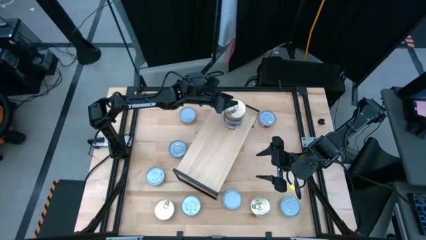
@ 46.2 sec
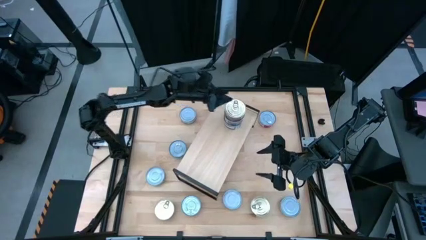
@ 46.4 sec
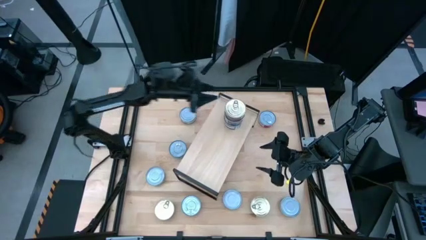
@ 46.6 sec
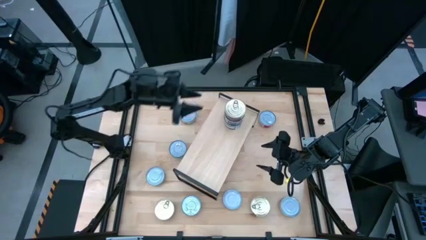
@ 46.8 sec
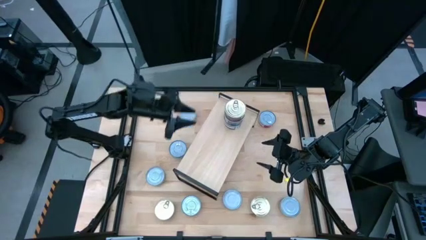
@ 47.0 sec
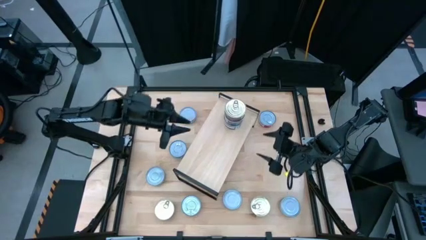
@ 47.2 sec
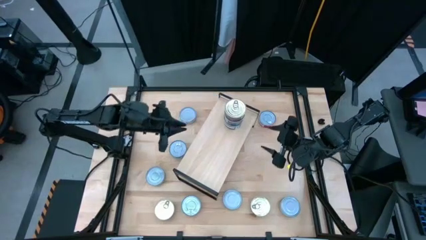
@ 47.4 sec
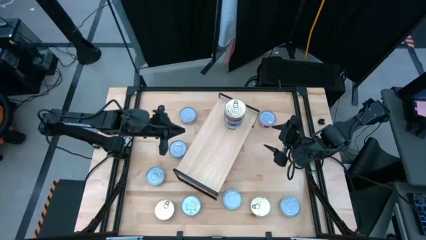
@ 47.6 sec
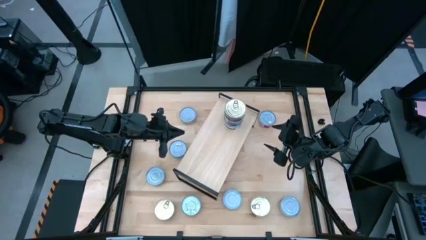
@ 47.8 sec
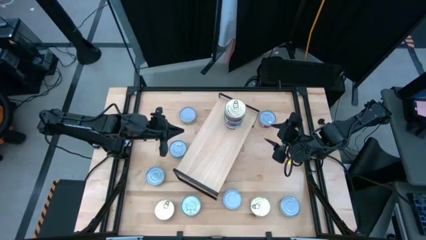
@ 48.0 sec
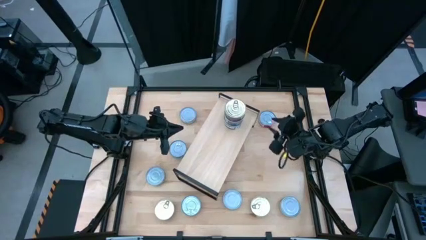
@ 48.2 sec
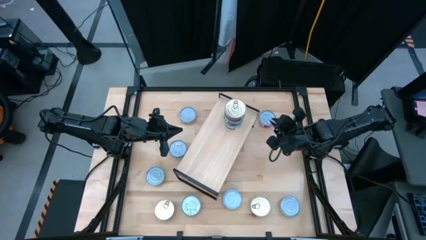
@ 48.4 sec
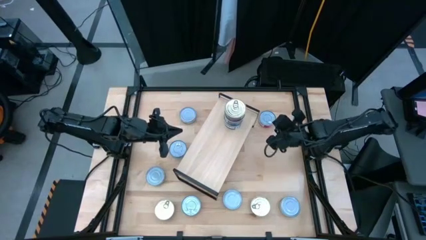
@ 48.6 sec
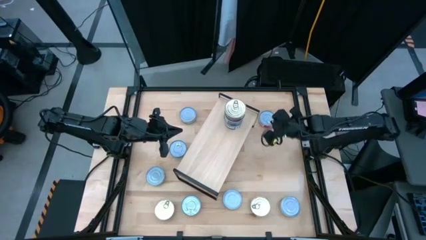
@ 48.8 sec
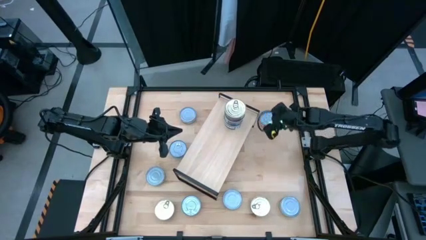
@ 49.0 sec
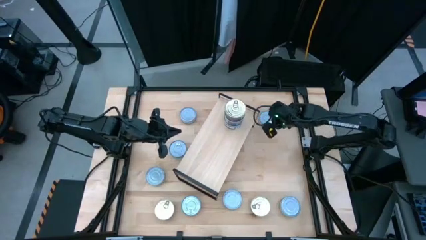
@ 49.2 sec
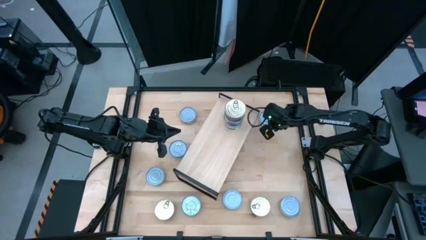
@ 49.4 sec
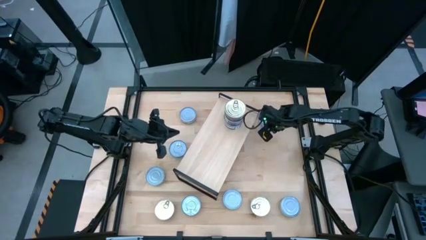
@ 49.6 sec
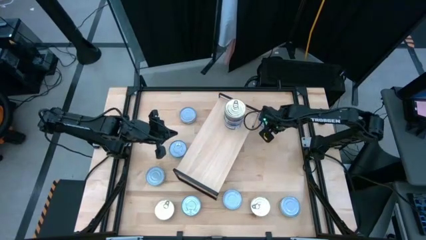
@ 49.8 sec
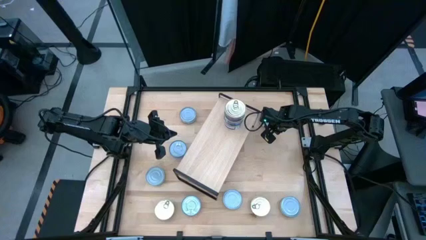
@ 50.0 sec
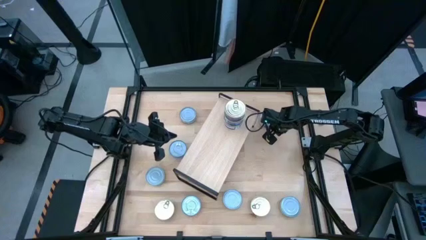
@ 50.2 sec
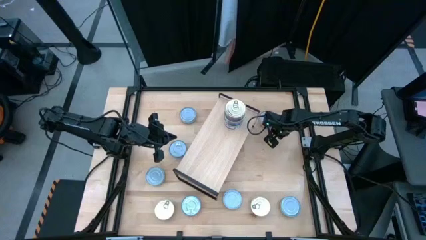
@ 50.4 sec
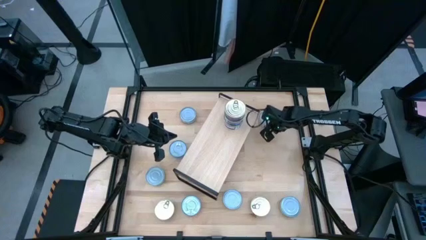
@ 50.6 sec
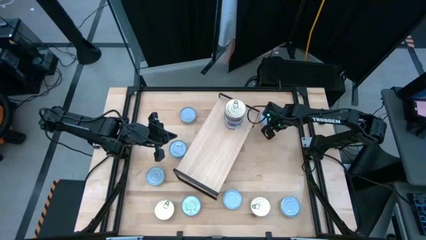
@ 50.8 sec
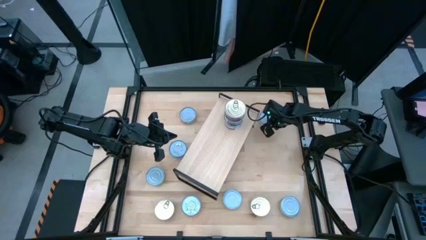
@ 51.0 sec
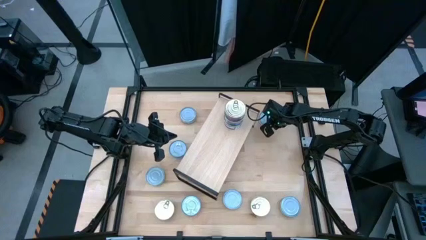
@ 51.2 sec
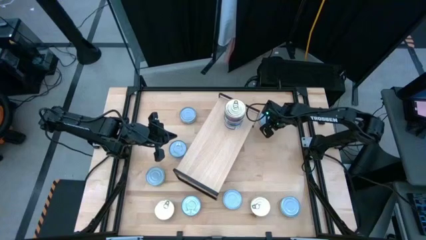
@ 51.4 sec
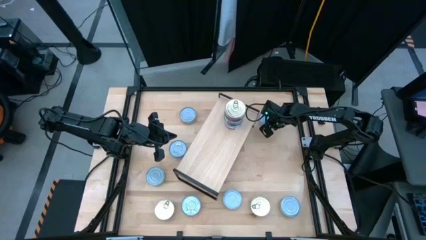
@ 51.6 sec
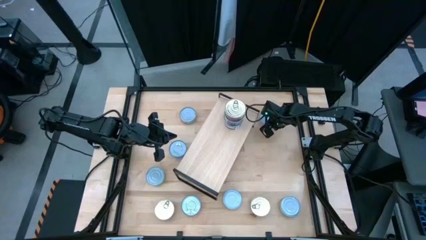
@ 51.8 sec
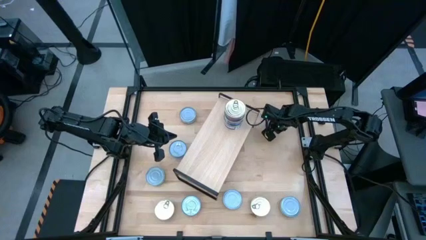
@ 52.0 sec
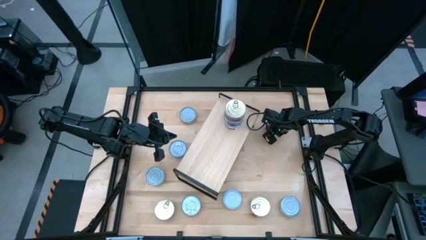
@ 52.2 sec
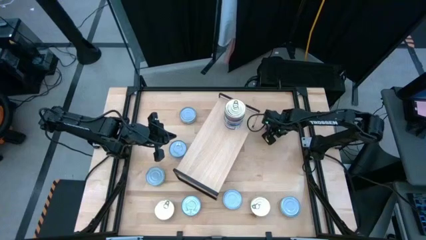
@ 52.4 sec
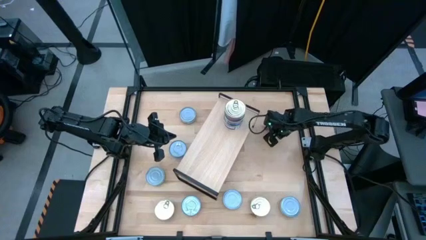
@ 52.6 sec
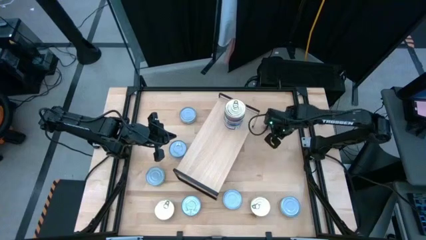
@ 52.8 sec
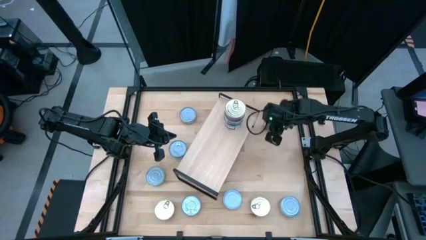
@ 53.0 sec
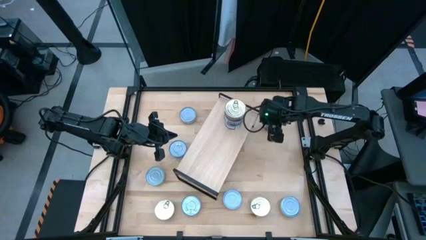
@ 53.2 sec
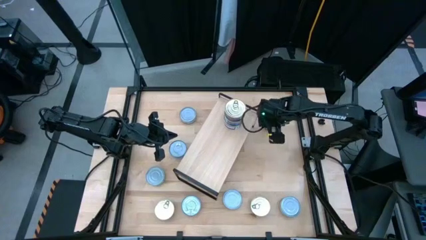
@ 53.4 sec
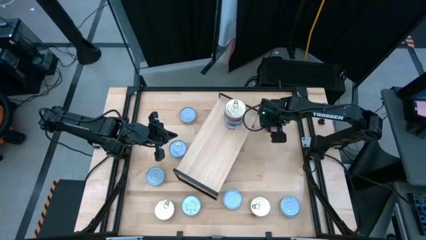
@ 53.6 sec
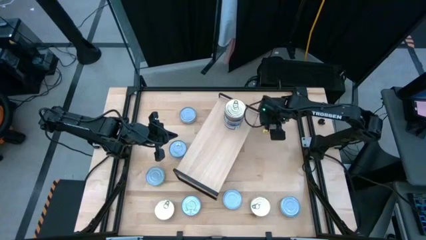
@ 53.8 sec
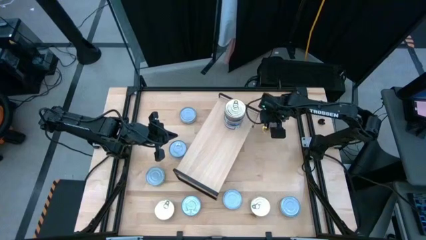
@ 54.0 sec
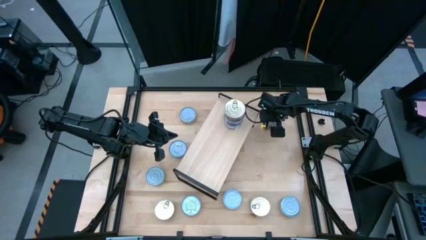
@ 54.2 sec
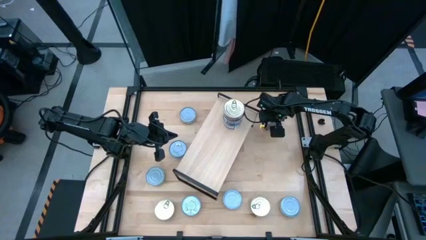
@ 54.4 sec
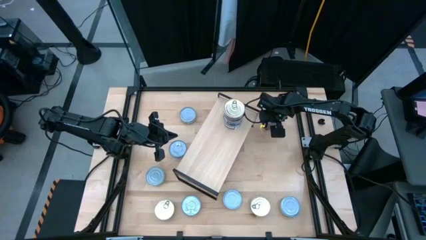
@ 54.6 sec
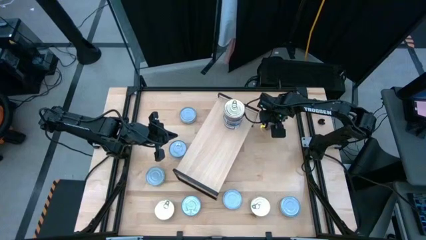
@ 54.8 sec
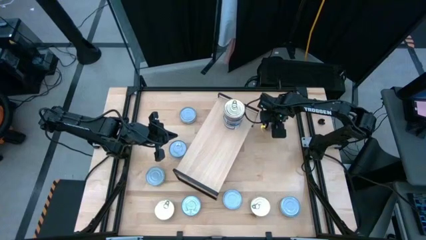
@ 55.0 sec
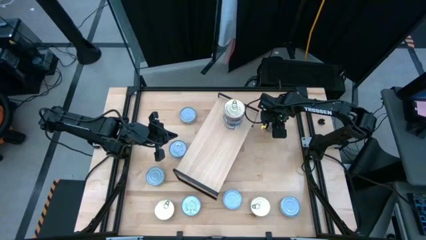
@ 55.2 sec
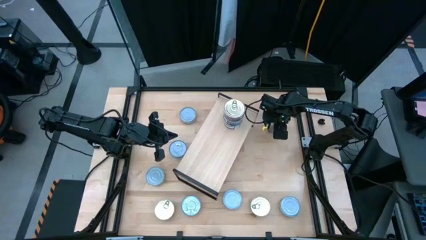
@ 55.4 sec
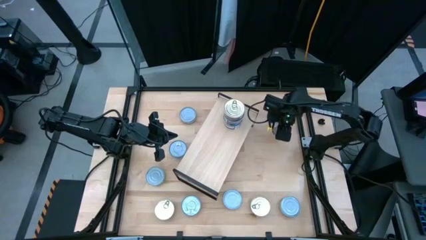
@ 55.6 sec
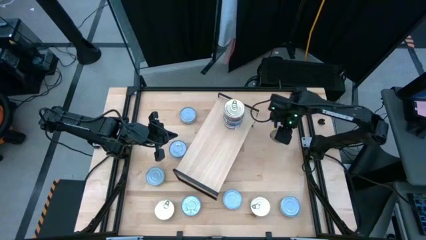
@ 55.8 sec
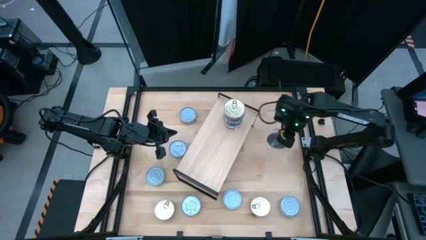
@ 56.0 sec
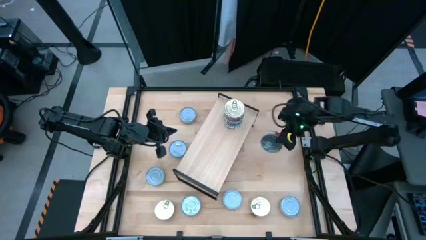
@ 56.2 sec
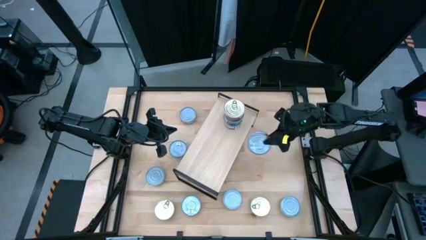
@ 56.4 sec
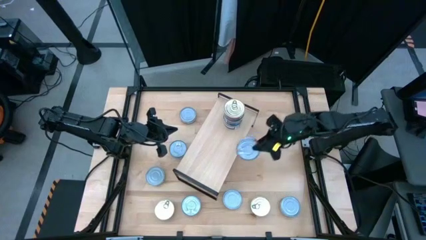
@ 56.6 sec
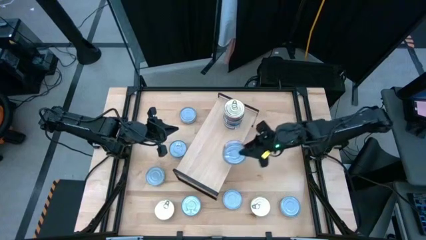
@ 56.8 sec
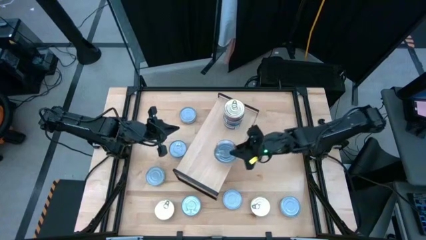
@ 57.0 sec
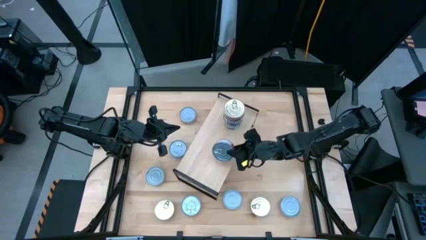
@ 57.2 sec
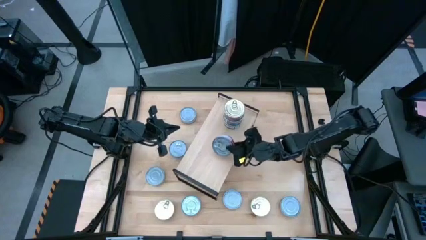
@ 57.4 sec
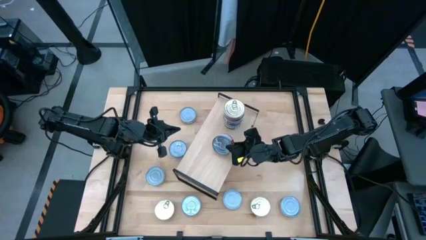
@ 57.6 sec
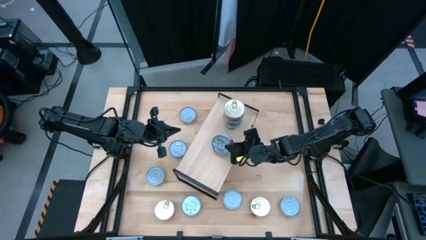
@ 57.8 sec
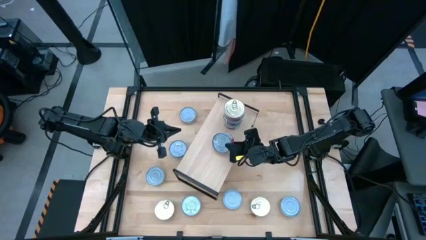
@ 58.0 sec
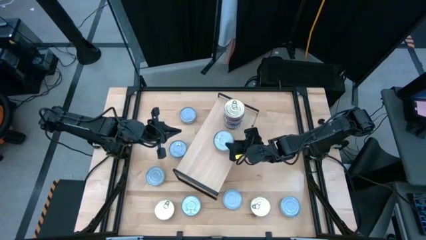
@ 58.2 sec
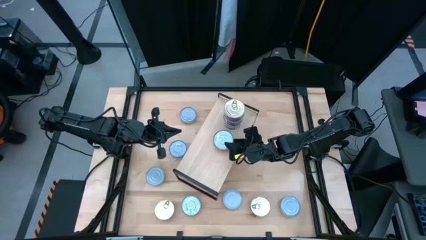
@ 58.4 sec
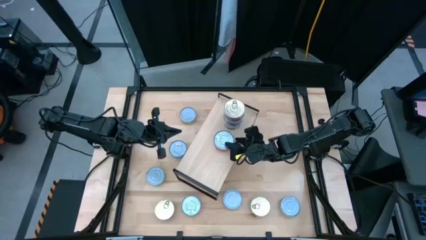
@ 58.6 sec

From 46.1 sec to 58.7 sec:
Task: Stack canned seafood by type on shelf
Put the red tuna can on the shelf

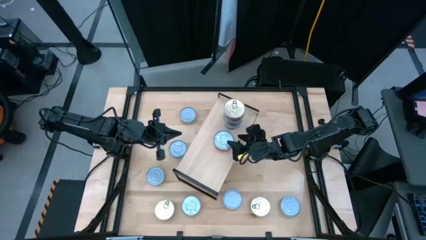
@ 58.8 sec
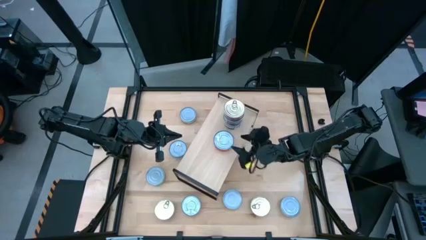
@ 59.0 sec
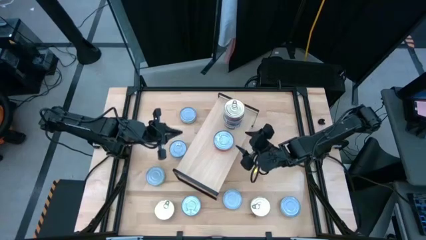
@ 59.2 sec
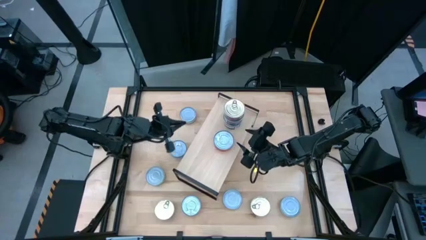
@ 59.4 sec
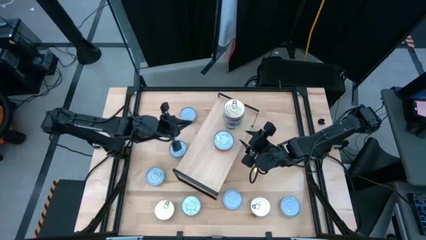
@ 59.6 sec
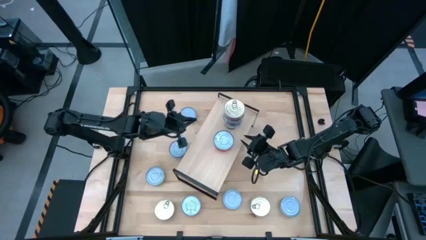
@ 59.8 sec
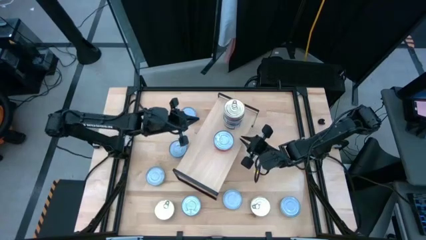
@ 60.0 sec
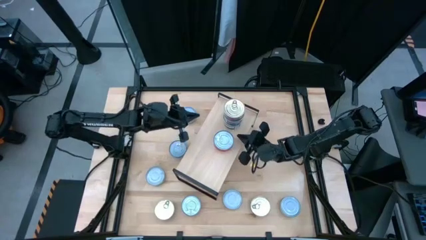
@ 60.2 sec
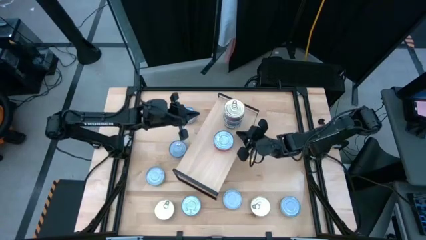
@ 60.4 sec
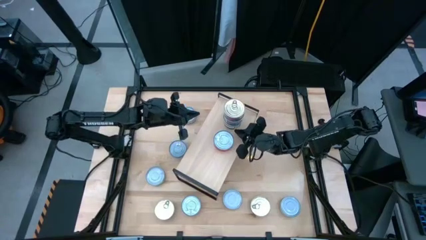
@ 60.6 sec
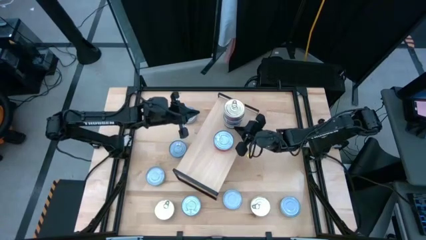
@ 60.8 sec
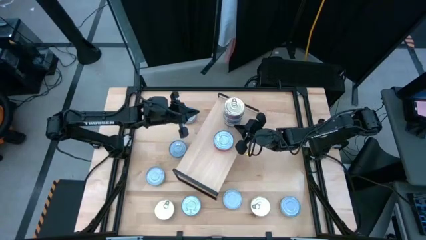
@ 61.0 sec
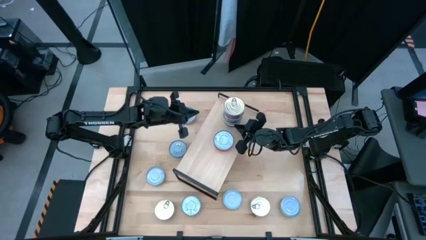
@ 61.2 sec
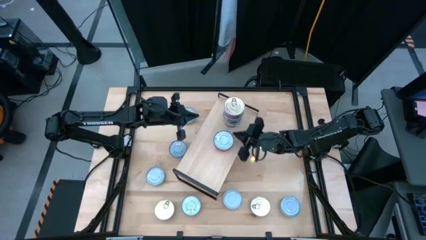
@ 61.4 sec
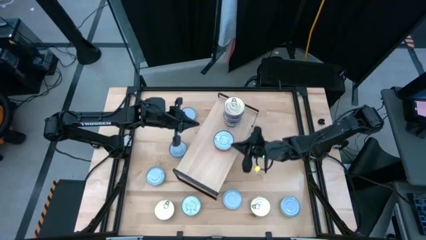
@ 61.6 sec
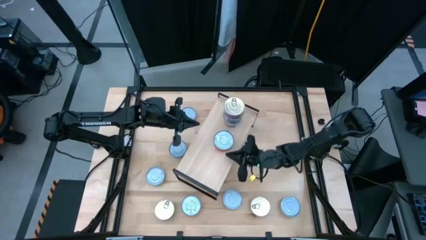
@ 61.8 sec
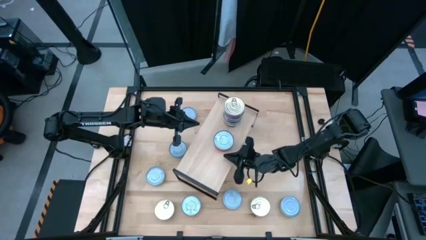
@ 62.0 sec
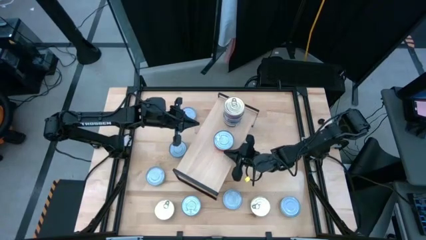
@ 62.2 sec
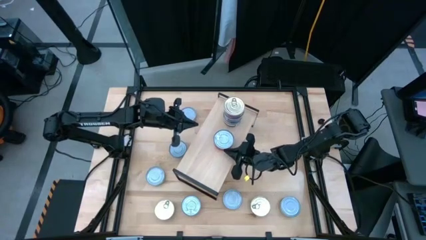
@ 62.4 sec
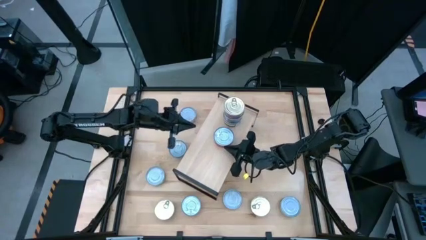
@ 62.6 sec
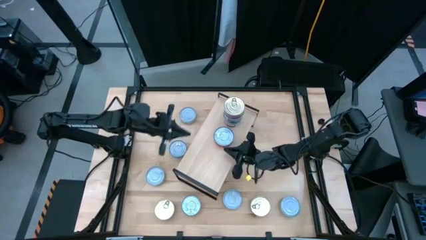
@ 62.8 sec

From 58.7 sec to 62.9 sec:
Adjust the tuna cans on the shelf

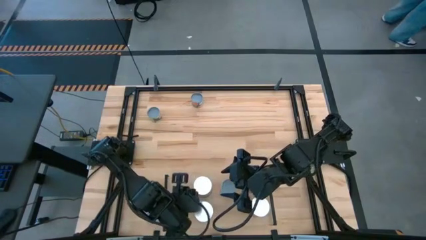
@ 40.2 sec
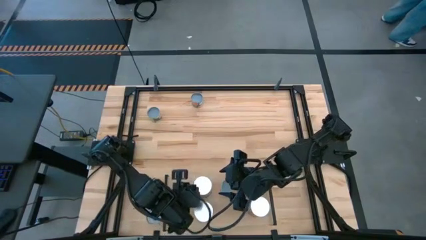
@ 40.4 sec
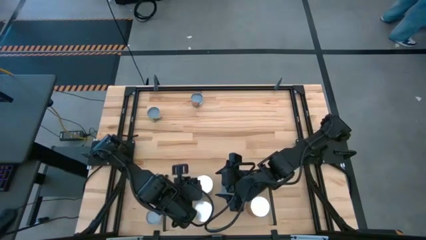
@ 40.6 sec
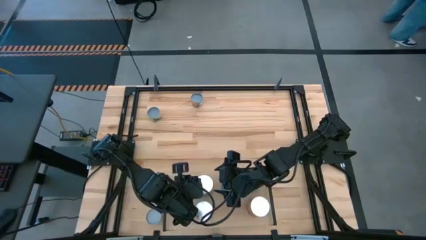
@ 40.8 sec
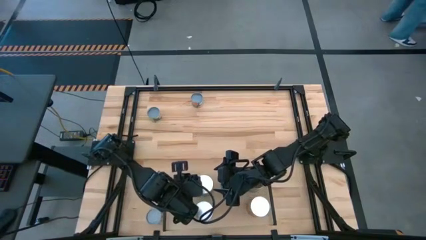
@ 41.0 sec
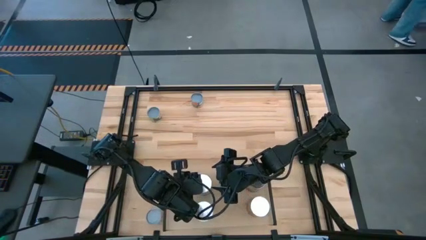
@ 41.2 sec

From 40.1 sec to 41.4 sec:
Task: Pick and place cans onto a shelf
Adjust the large canned peaches on the shelf
